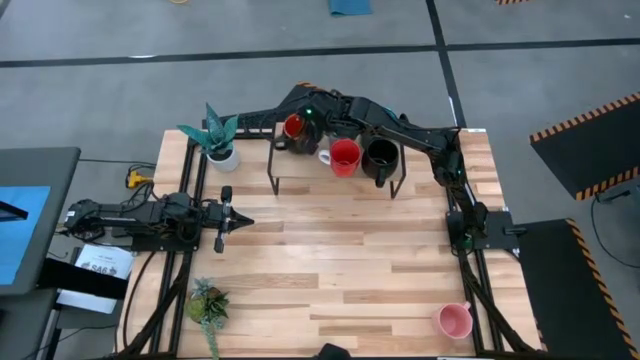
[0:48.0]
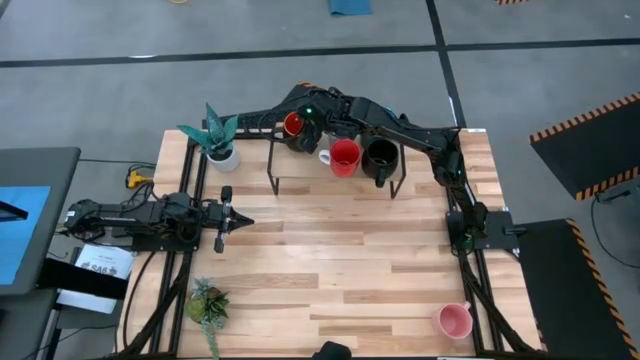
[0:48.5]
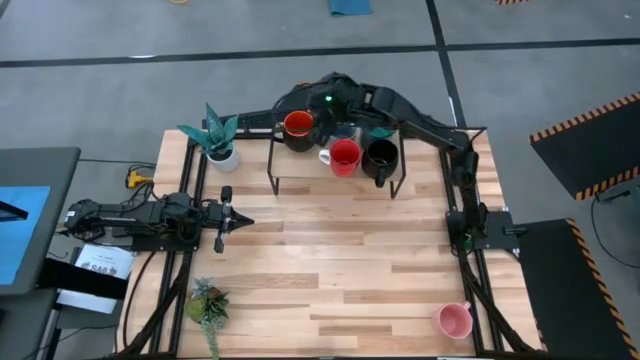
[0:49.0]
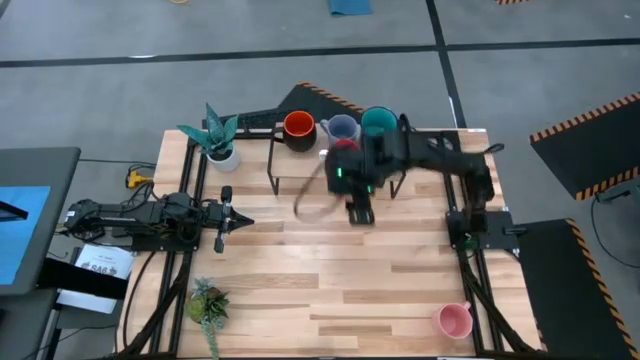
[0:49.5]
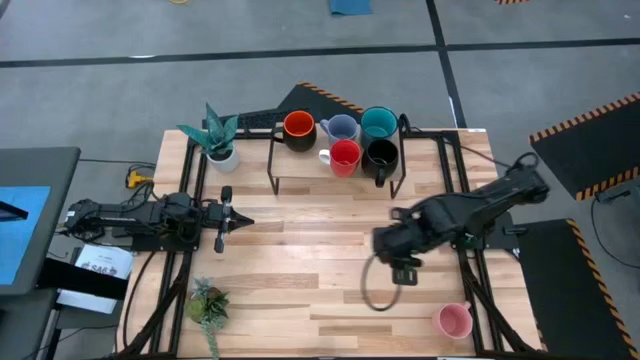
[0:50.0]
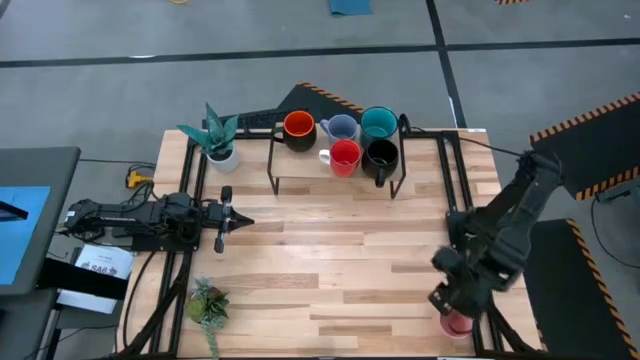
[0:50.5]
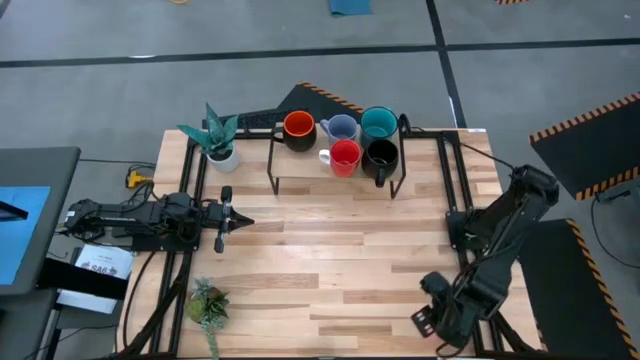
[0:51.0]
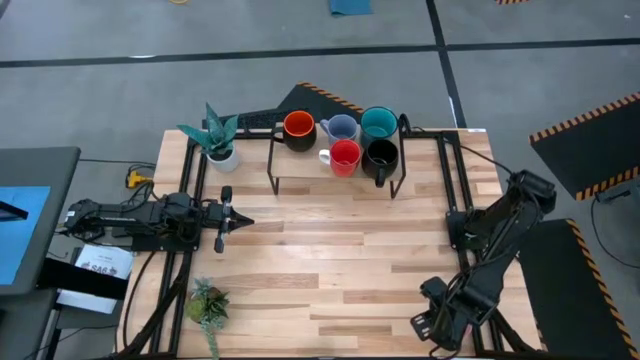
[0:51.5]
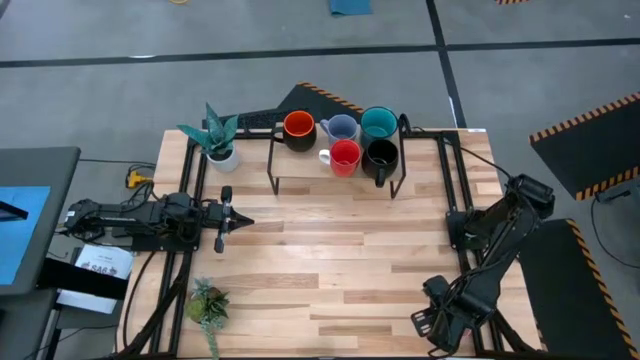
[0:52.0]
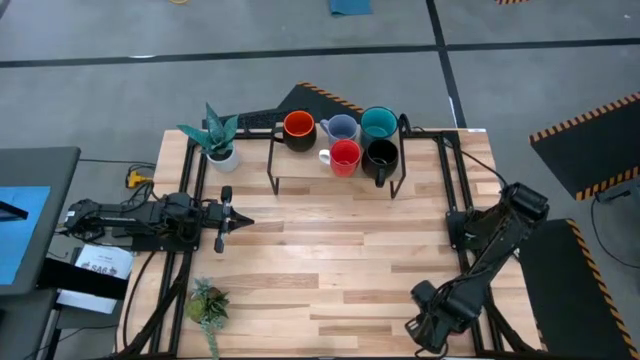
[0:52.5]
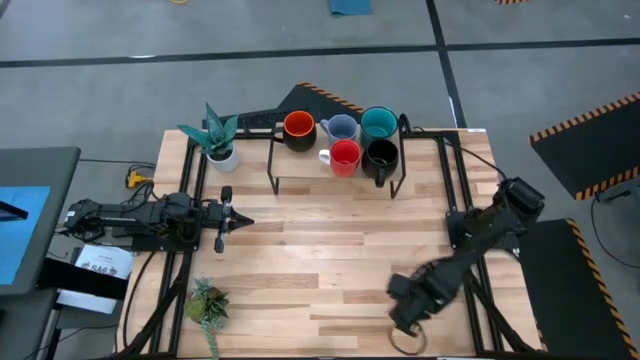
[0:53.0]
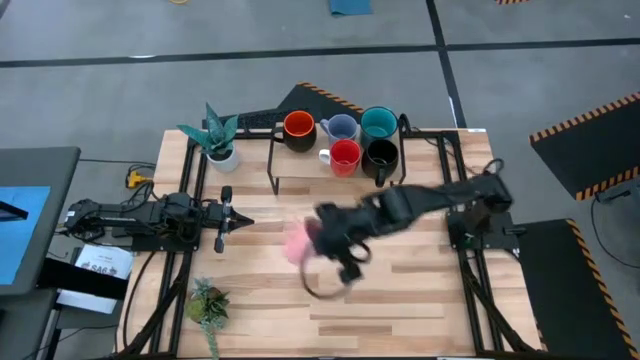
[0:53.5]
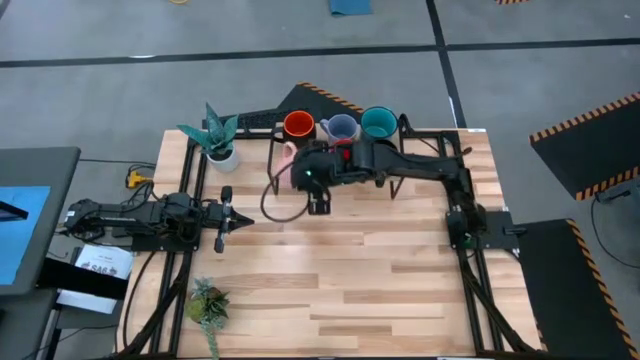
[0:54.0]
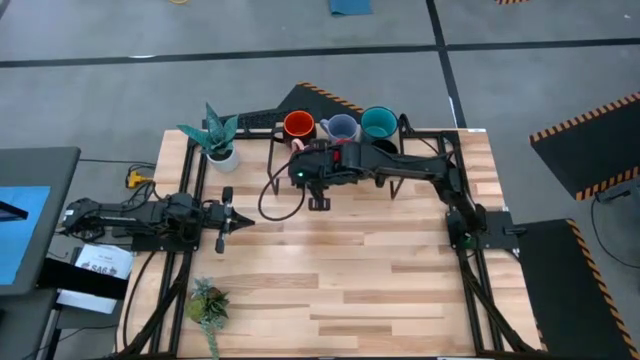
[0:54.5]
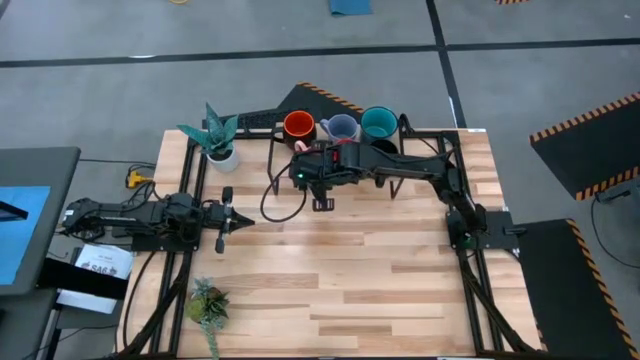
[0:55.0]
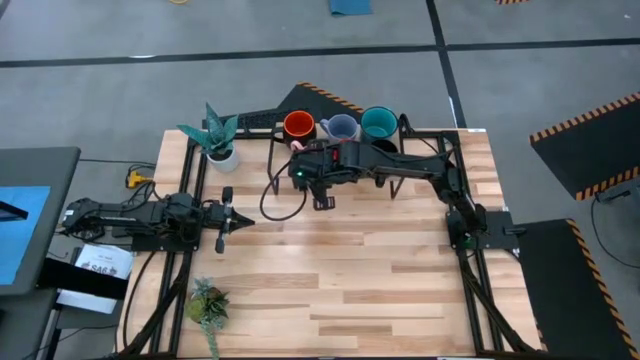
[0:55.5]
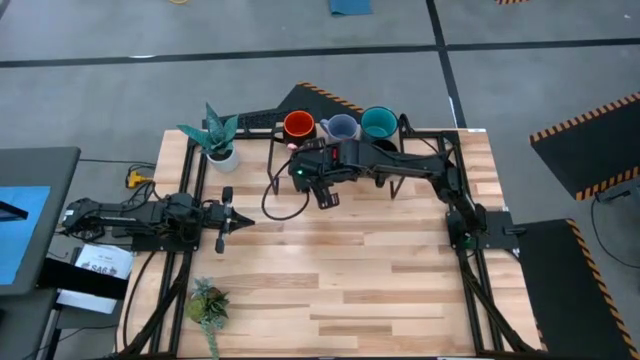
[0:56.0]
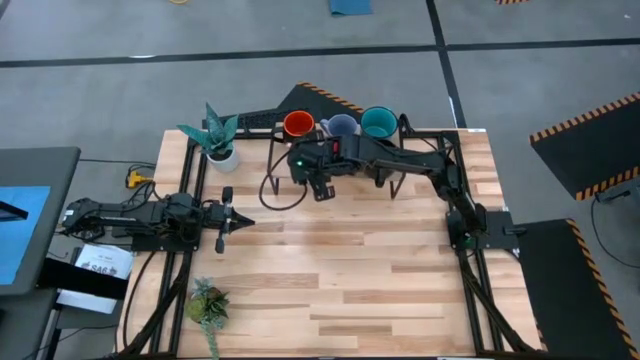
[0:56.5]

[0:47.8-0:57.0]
Task: Place coffee mugs
Put the pink mug on the shelf

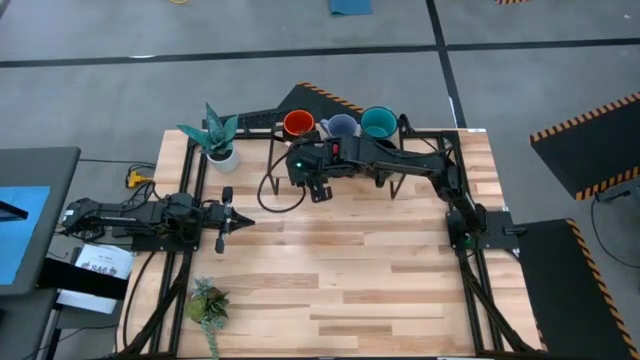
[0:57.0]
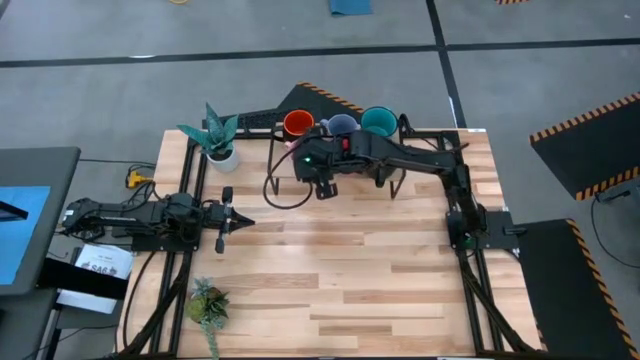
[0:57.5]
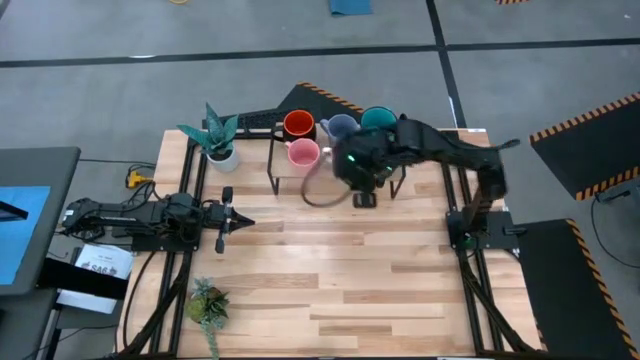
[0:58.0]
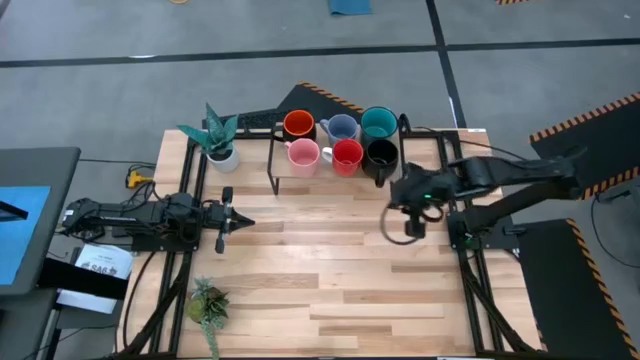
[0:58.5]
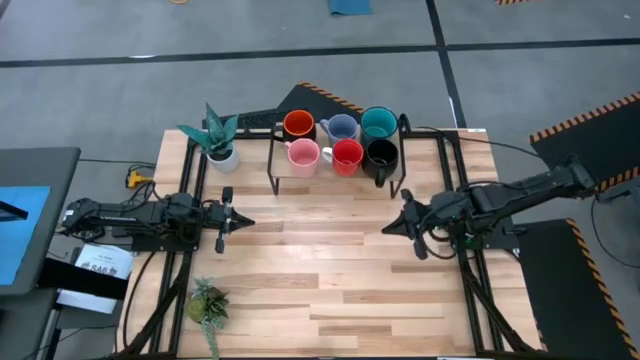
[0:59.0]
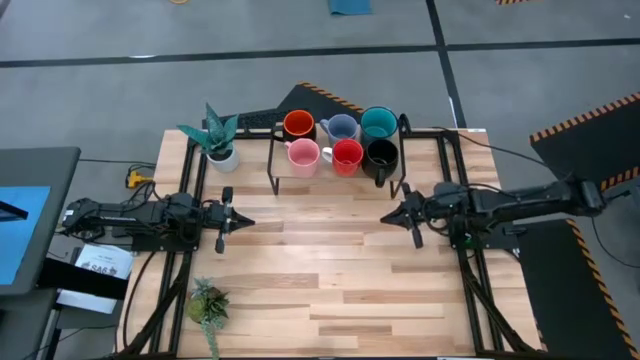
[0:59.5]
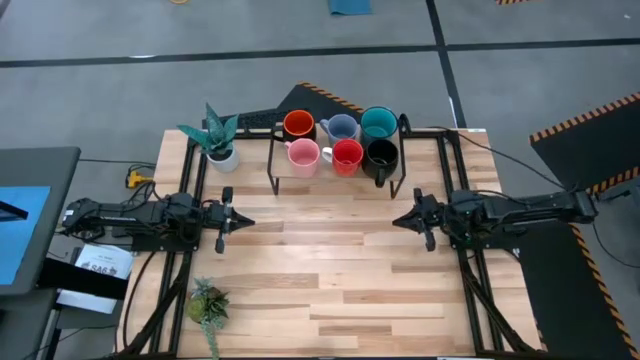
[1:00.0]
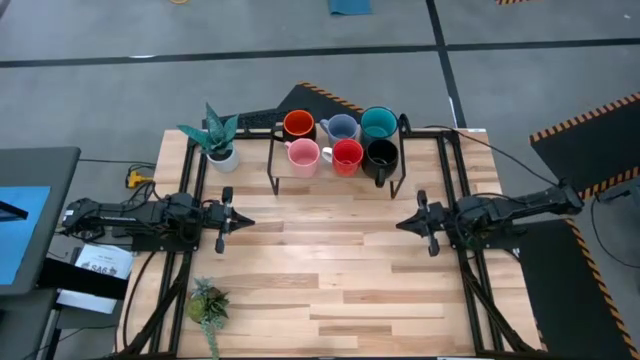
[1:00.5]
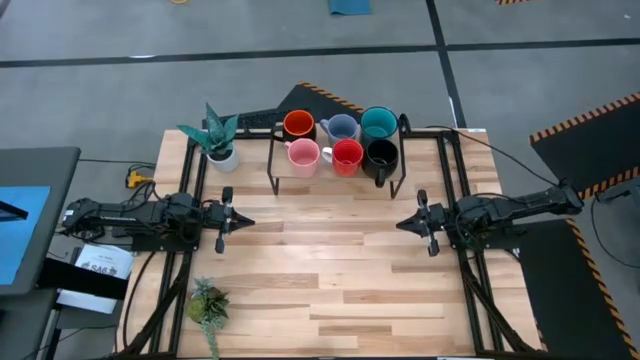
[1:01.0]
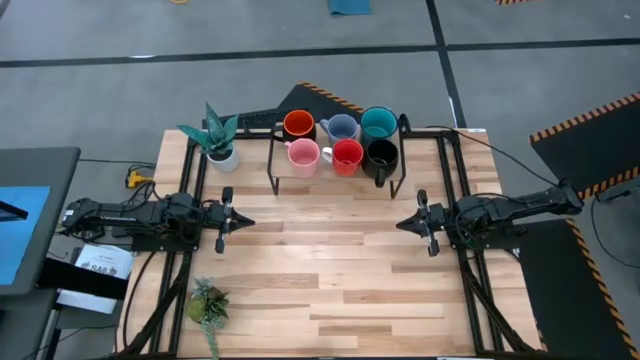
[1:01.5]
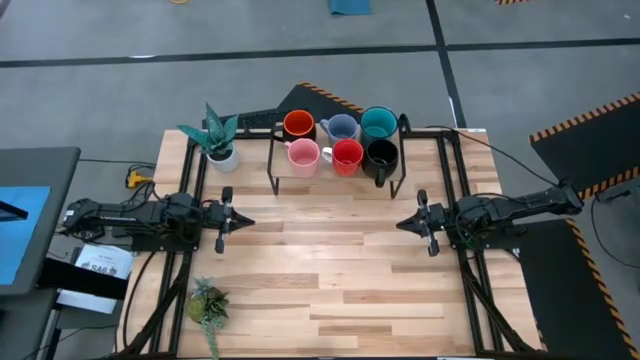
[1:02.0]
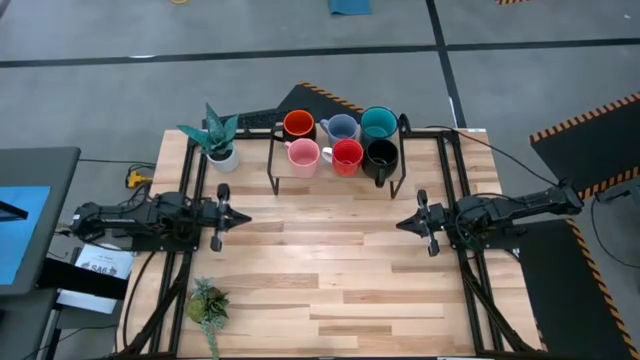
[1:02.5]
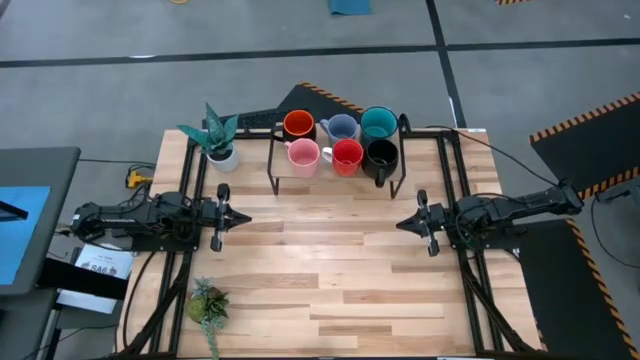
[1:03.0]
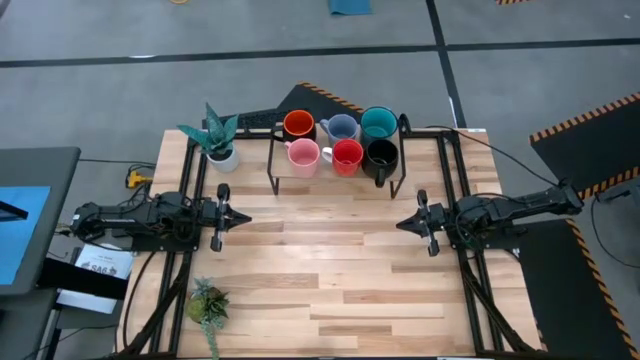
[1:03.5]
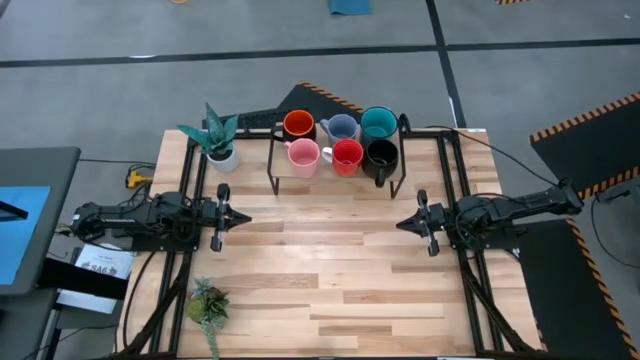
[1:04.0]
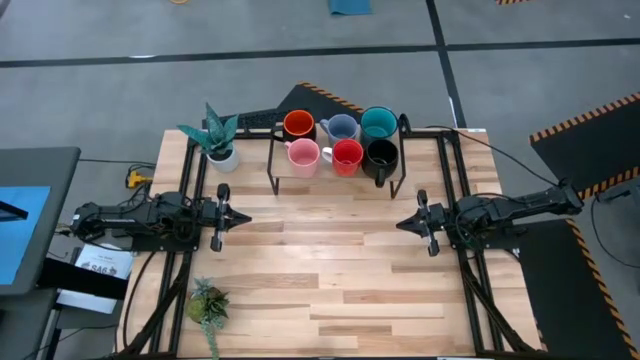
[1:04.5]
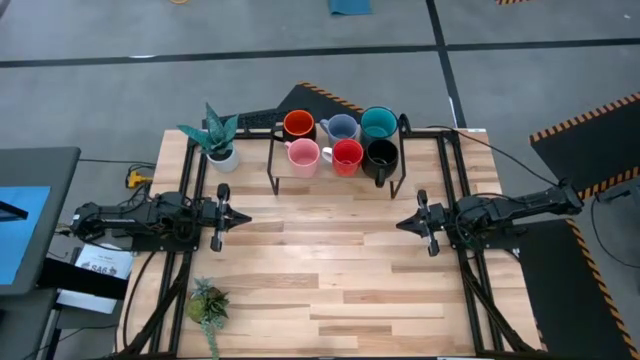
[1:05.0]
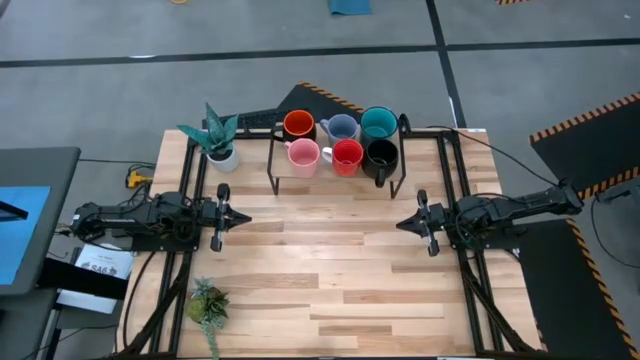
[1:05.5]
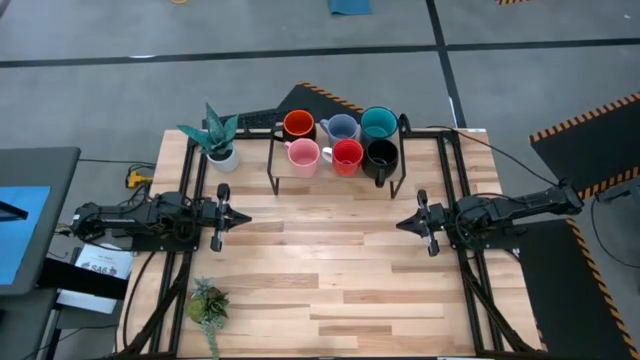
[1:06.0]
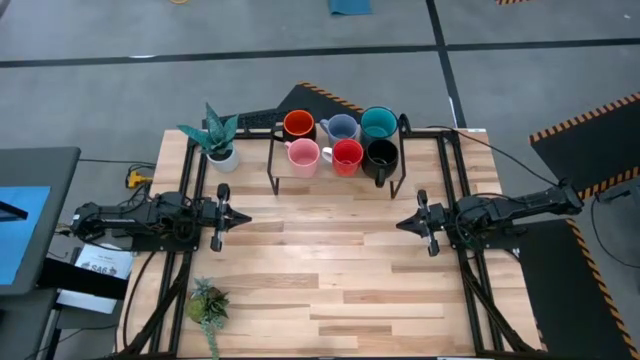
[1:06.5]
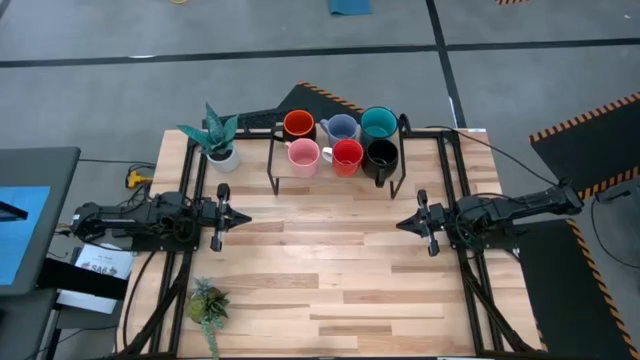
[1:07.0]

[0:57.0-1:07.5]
Return to Home Position

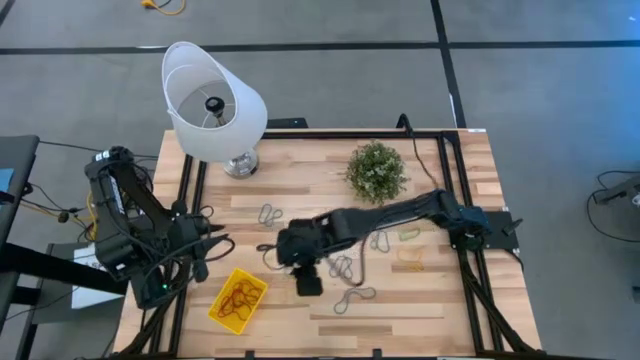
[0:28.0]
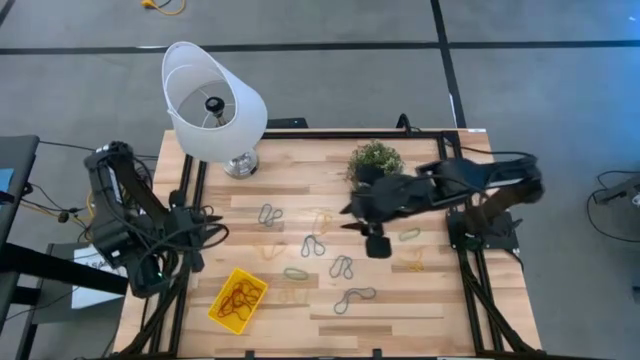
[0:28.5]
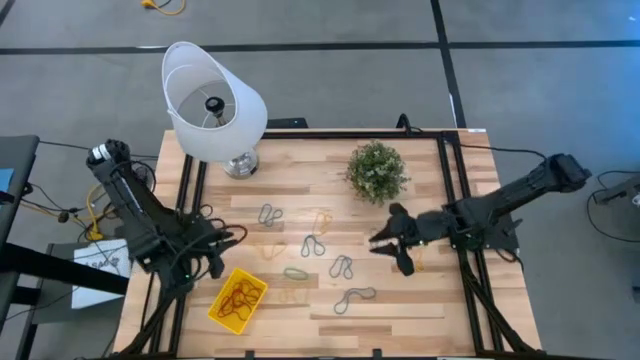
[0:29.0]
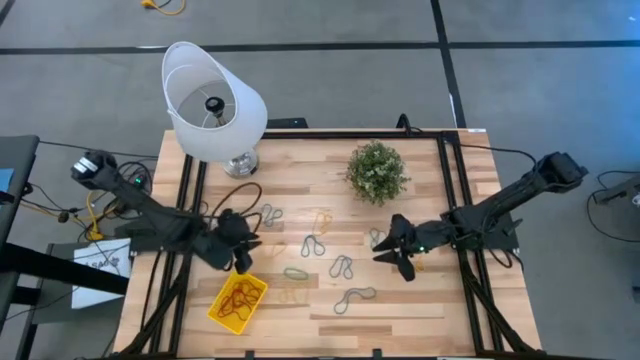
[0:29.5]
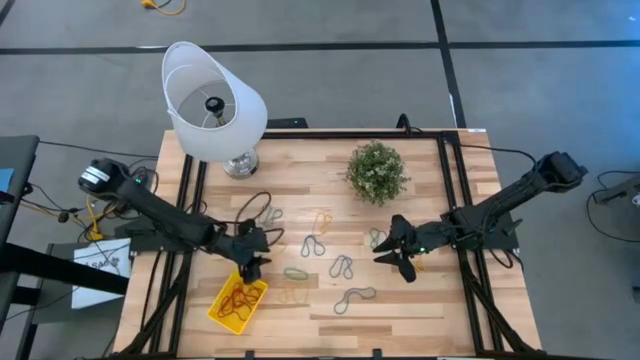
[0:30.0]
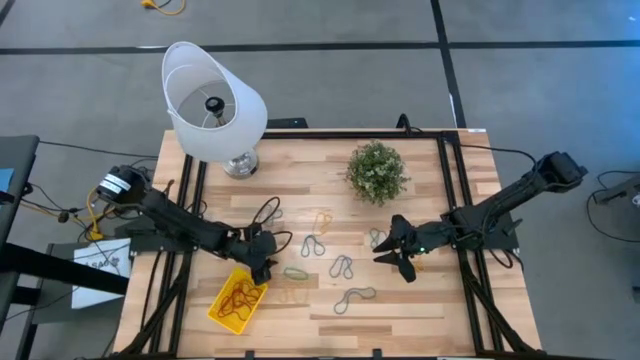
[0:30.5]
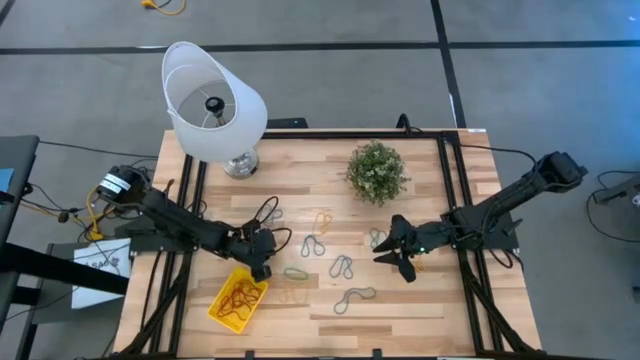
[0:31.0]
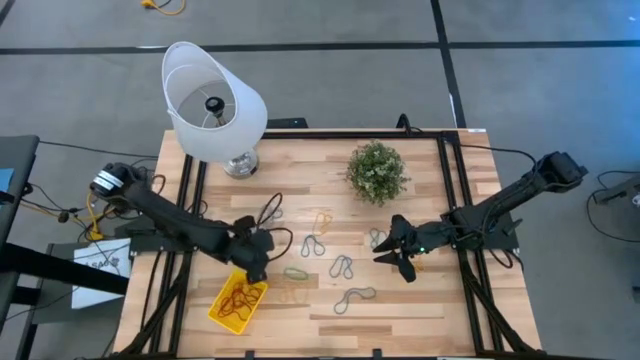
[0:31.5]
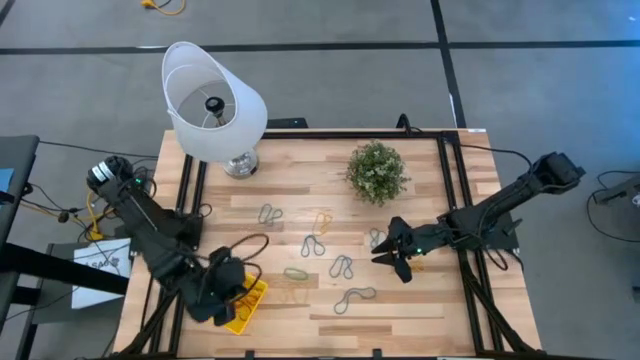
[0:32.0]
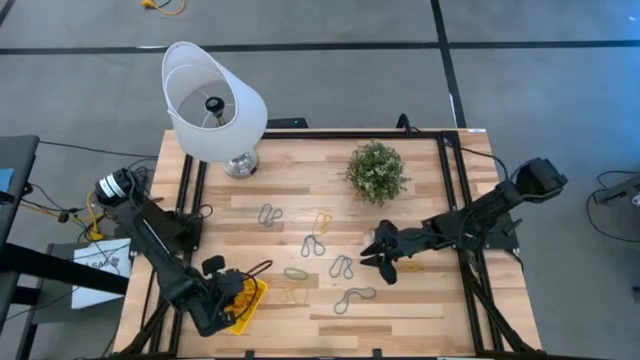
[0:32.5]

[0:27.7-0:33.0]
Task: Pick and place items into bin
Put the middle left yellow rubberband into the yellow bin
